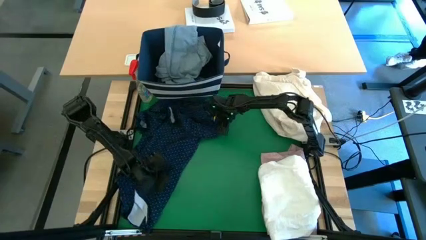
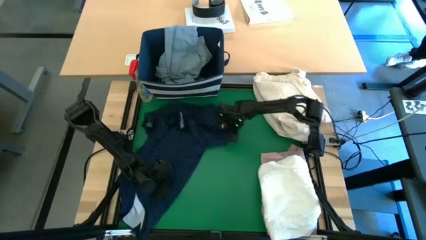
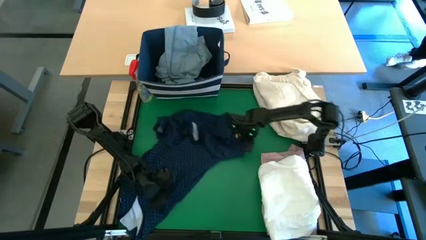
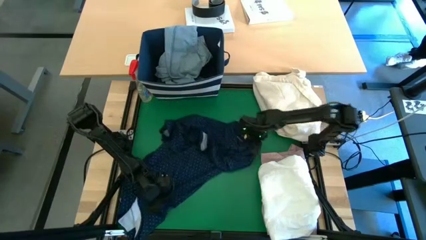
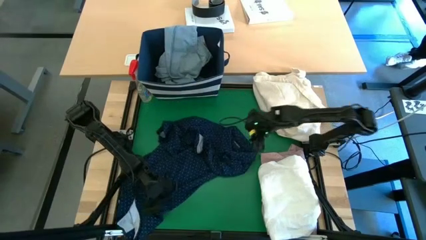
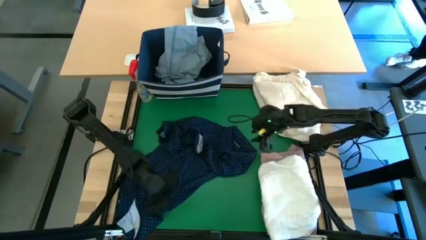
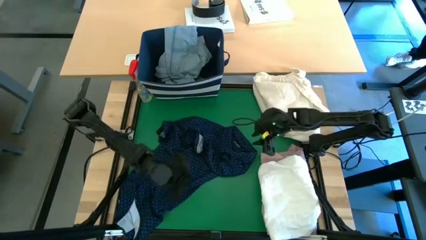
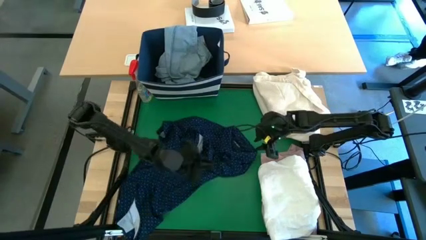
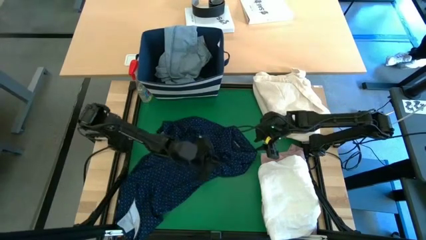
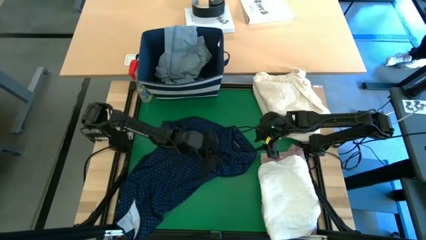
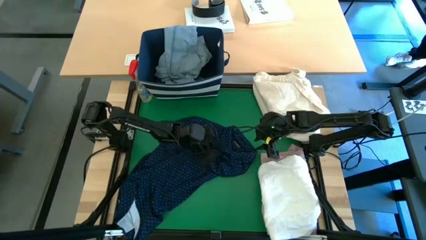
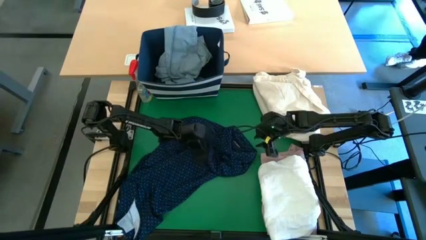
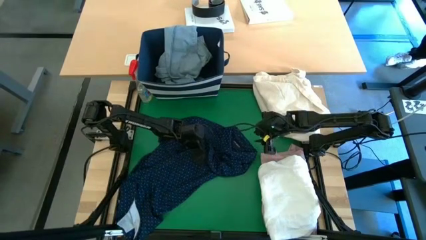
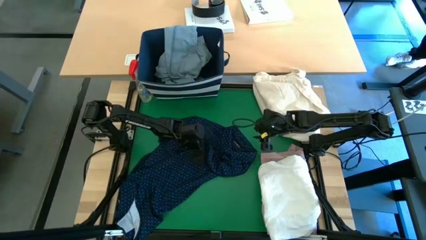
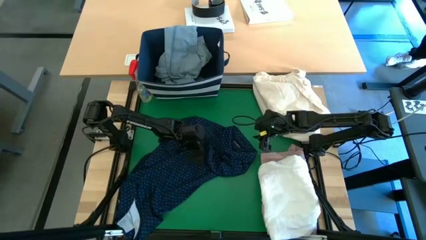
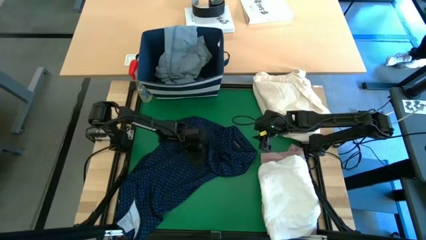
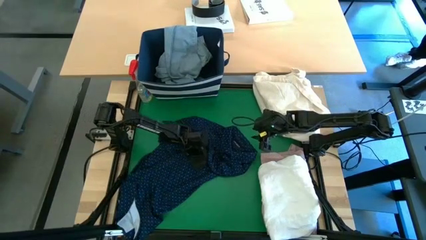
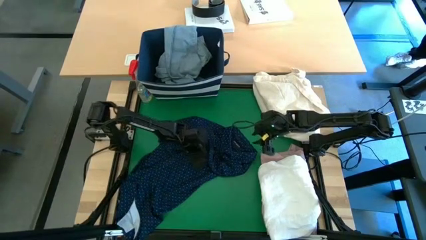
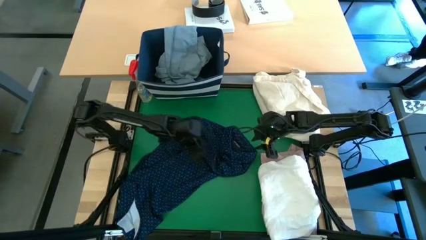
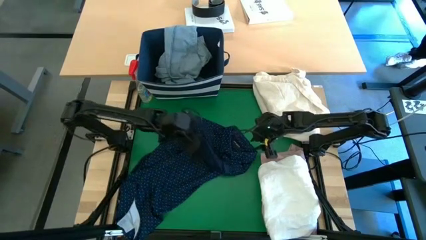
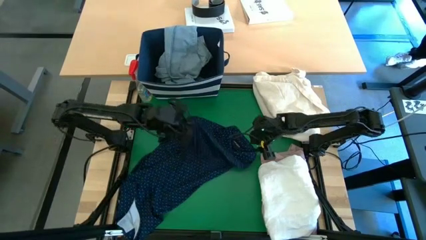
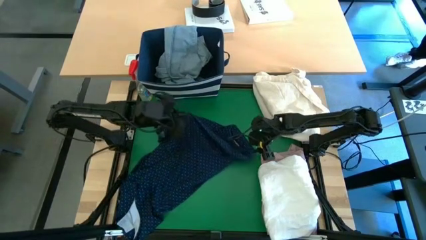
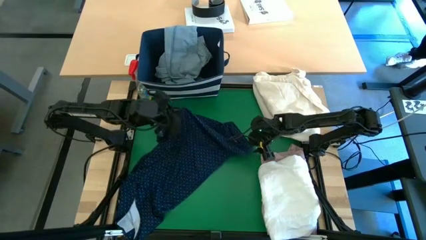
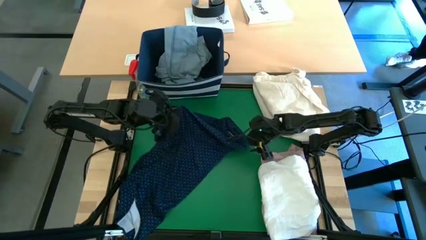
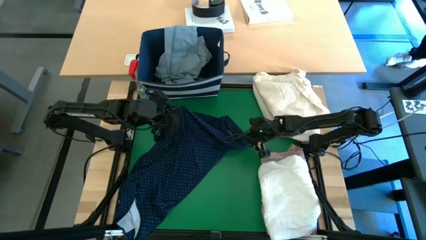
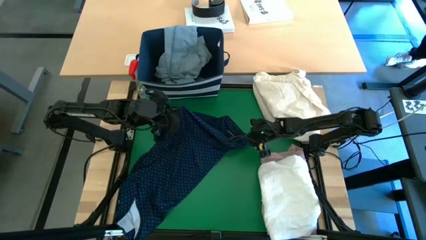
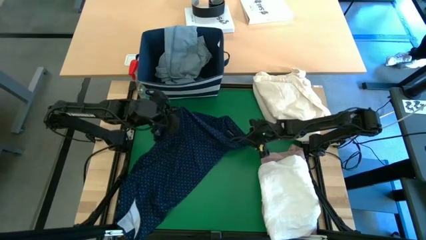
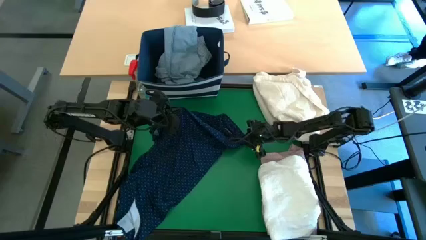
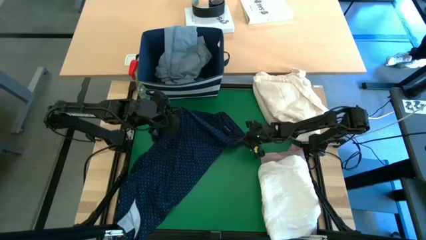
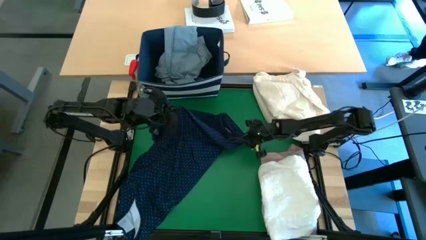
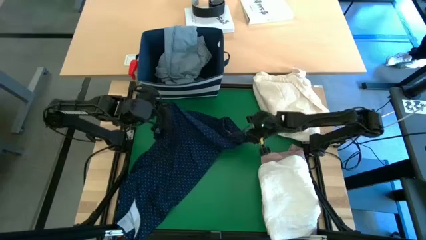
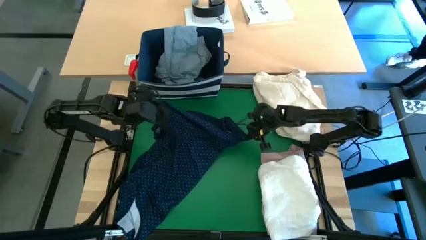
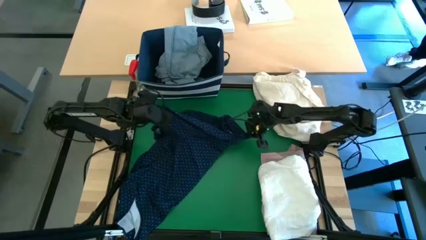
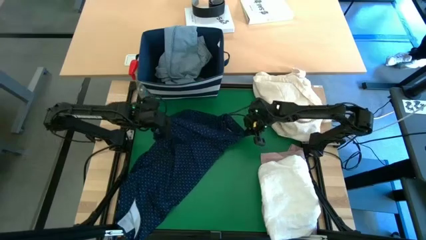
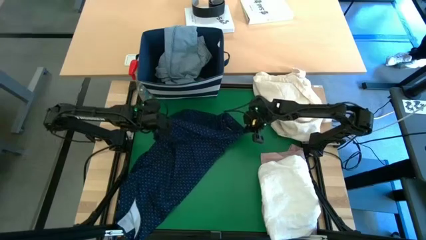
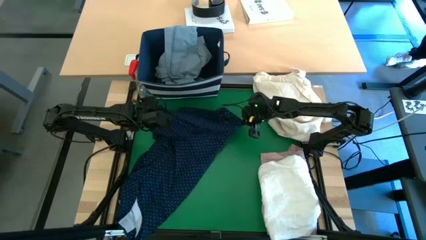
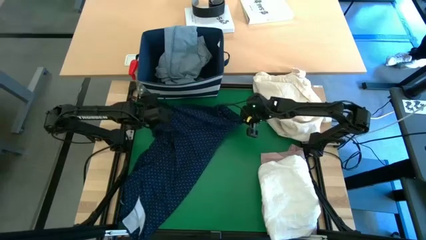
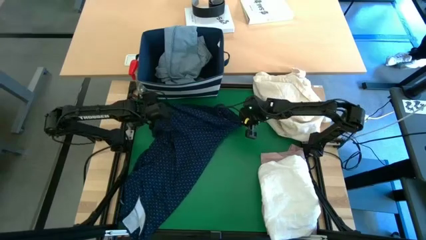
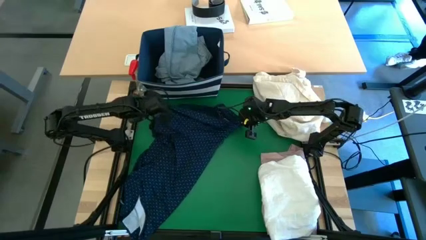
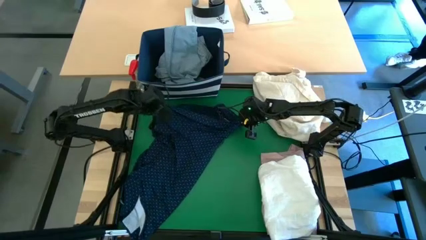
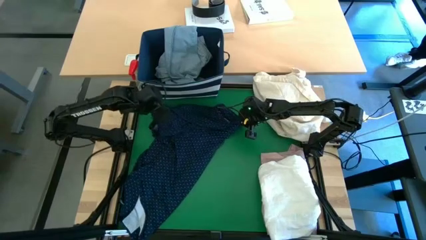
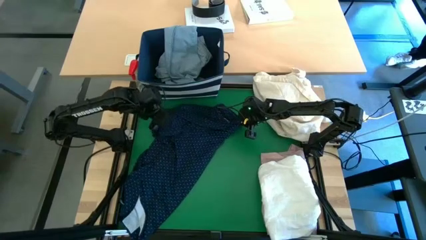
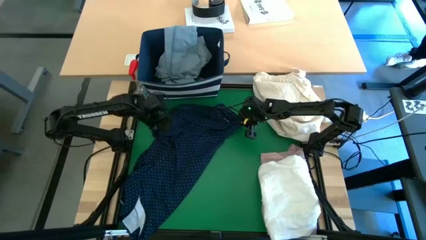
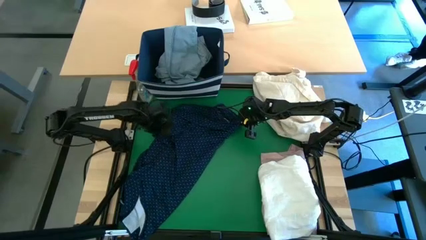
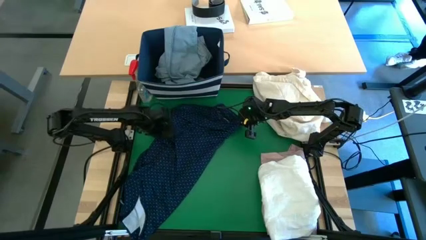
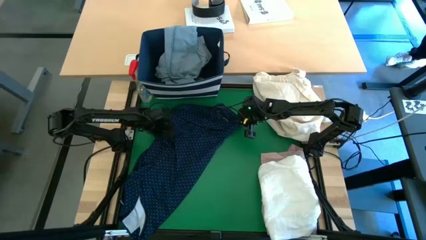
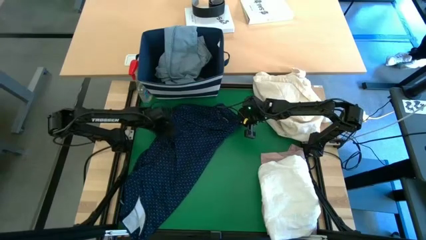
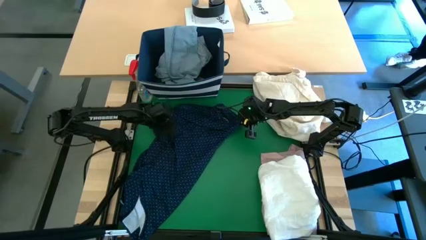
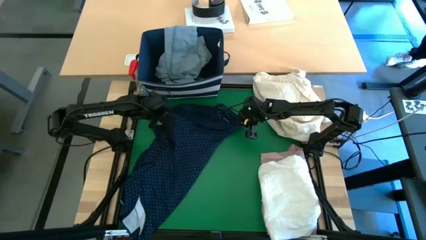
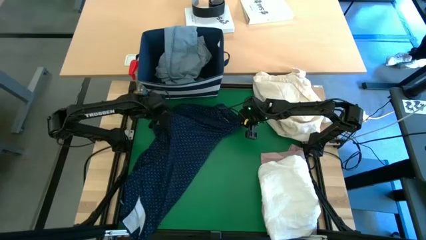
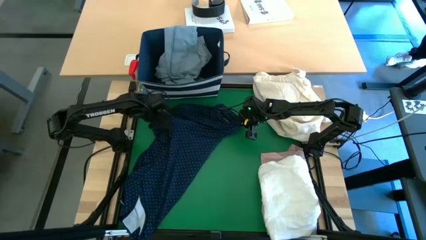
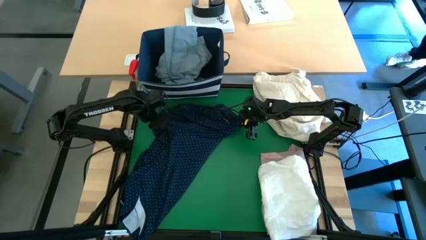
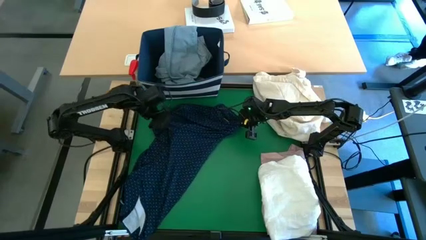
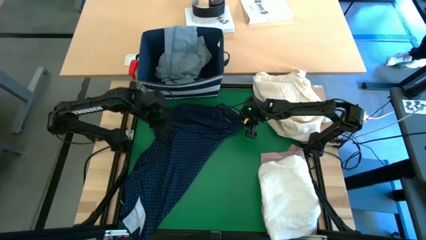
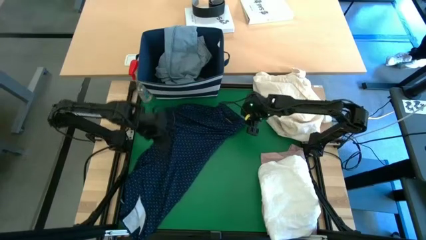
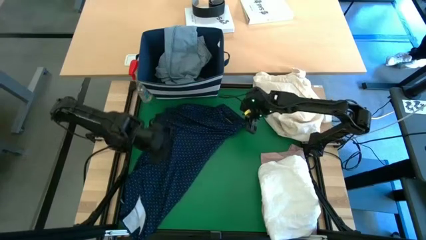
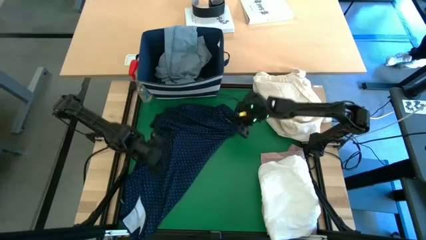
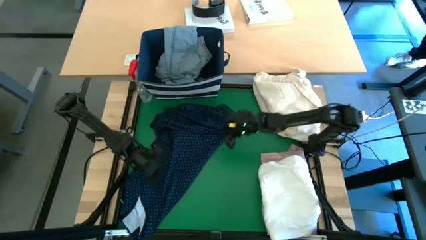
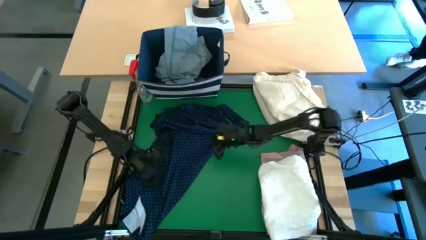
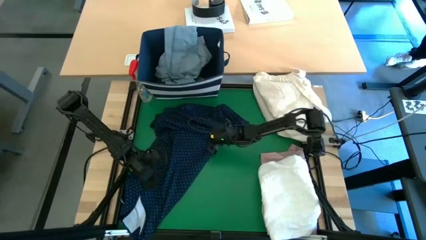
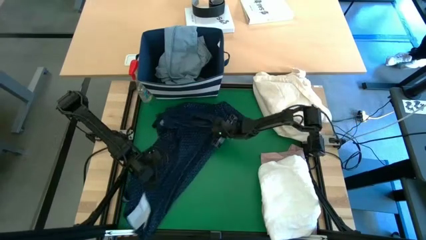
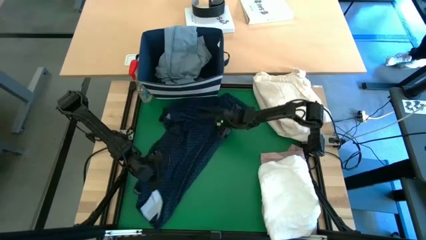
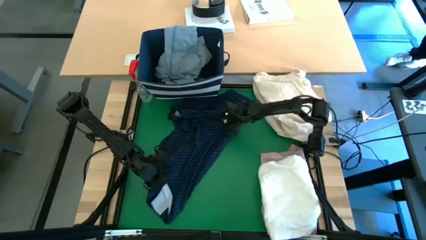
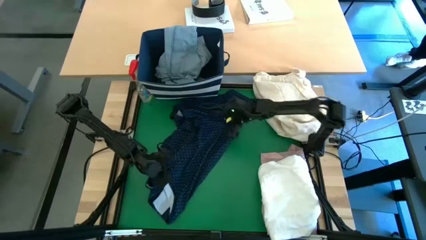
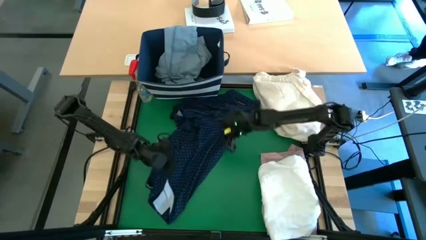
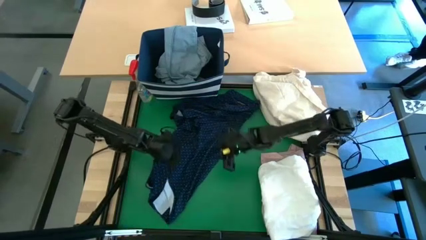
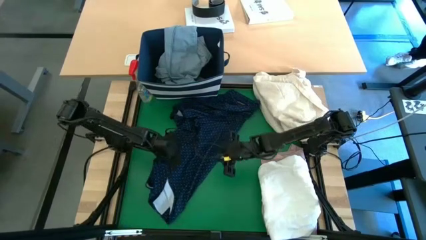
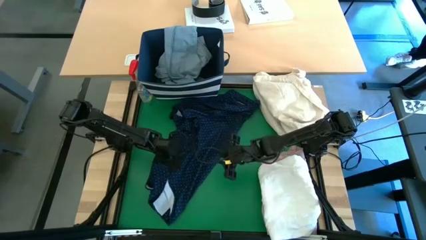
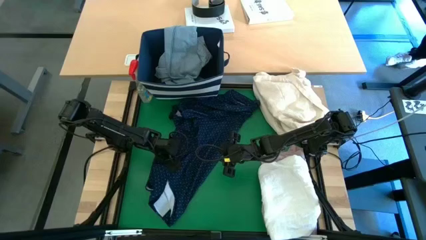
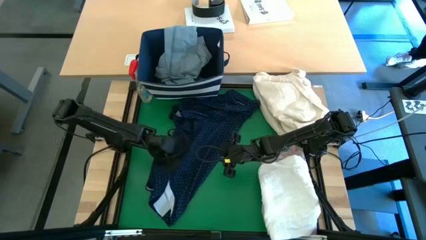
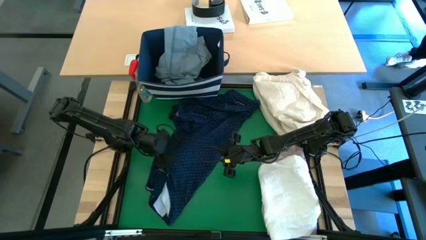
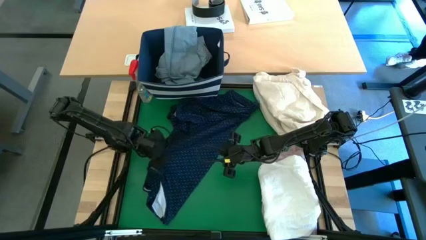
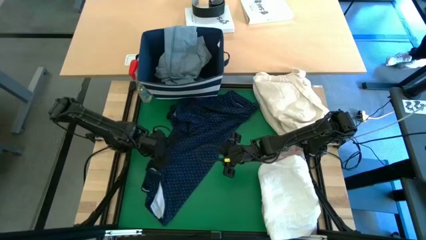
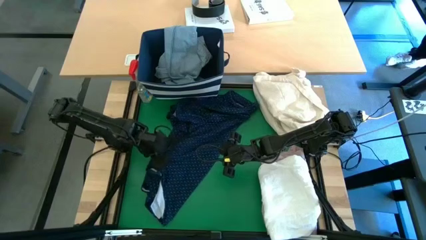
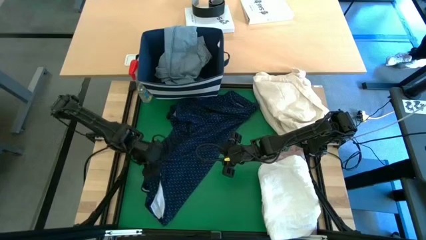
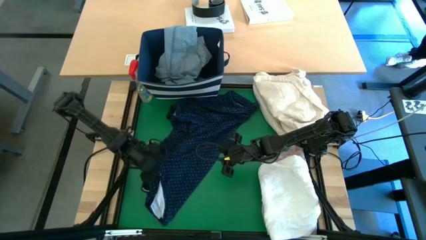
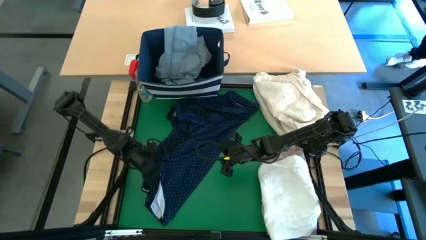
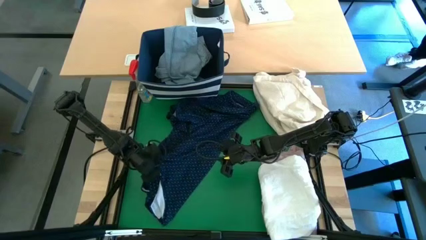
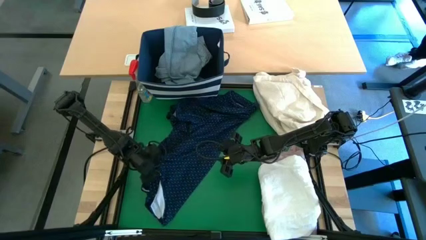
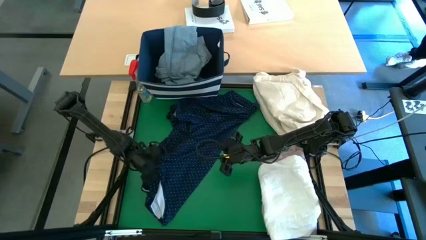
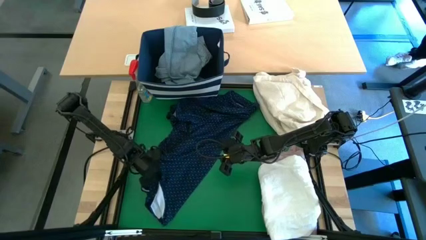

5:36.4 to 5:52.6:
Task: Fold laundry
Fold the blue polo shirt

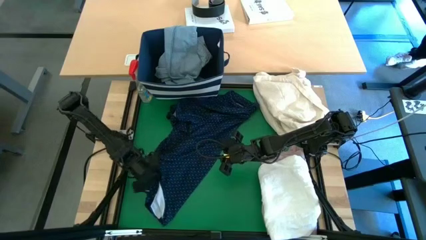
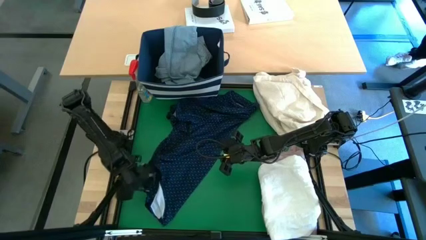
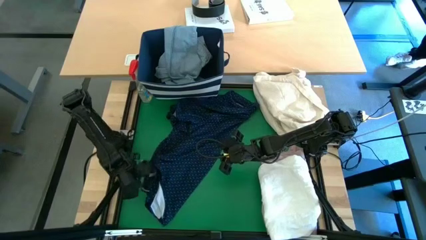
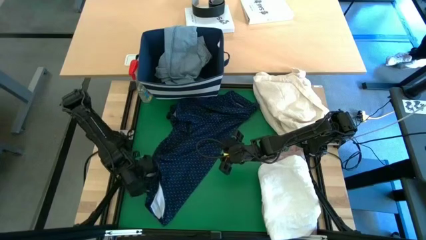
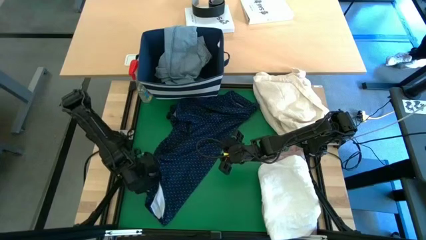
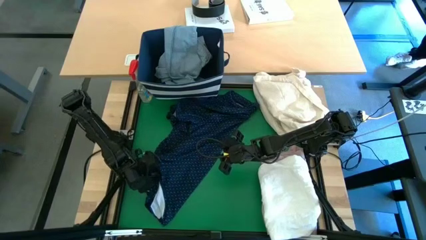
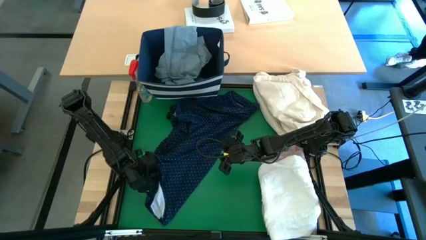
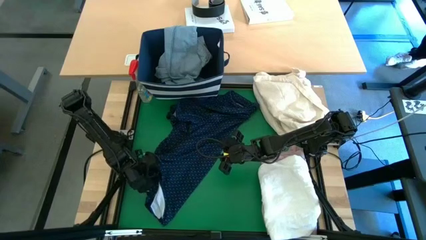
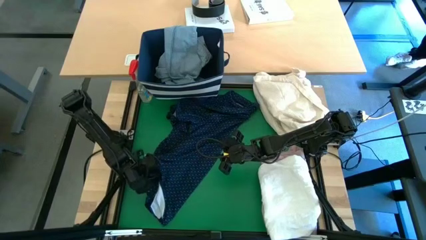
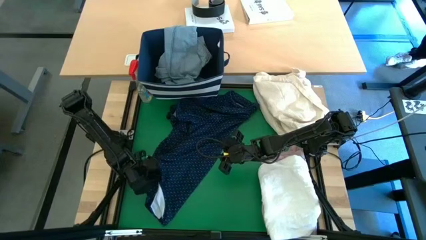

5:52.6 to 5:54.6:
Fold the blue polo shirt
